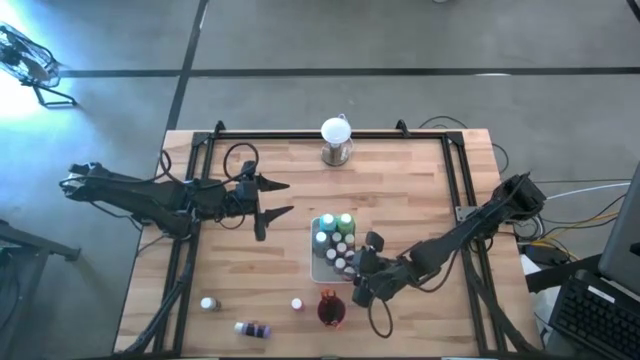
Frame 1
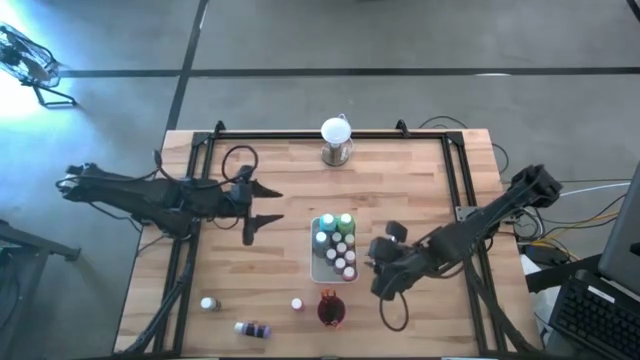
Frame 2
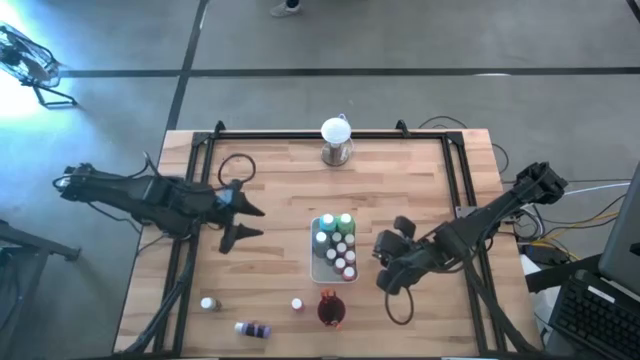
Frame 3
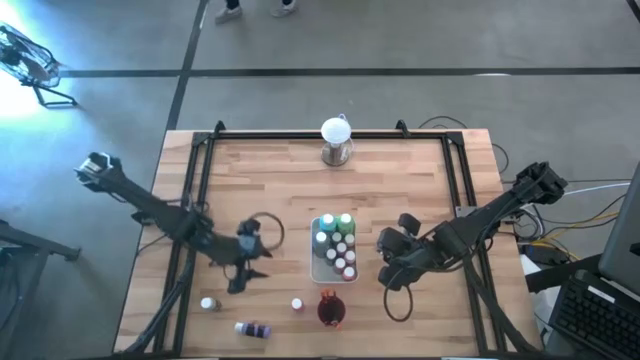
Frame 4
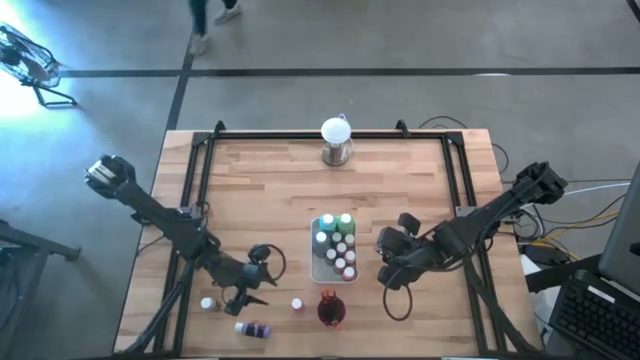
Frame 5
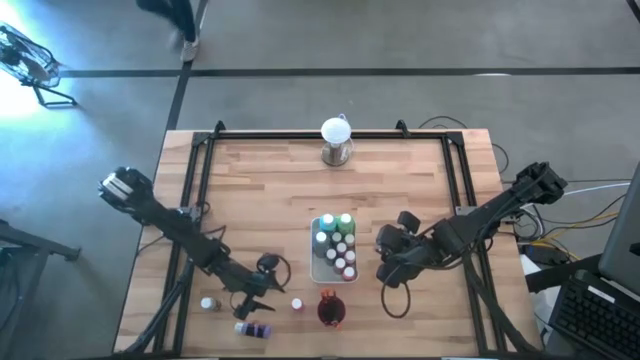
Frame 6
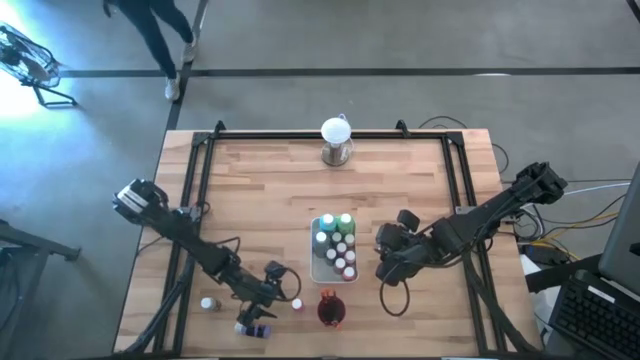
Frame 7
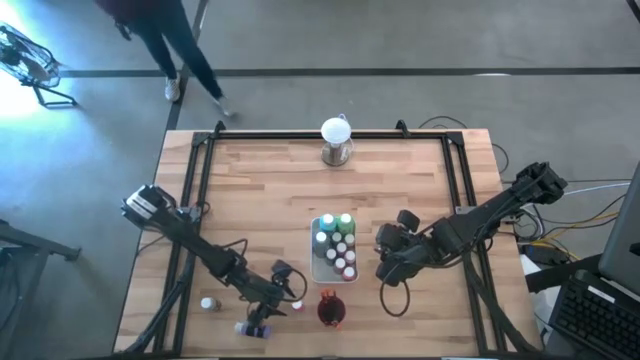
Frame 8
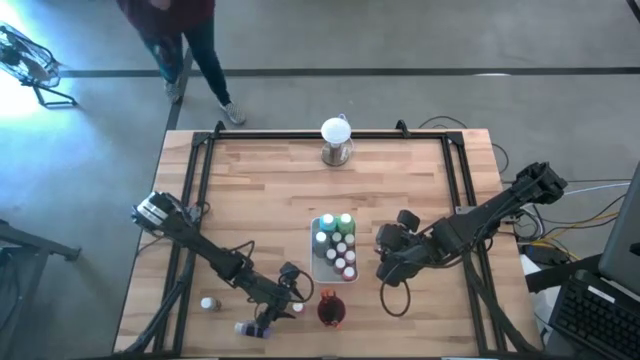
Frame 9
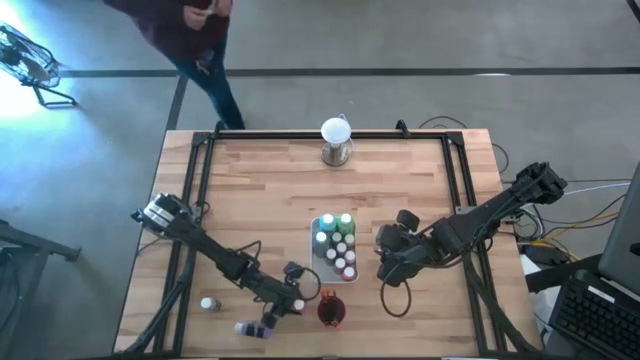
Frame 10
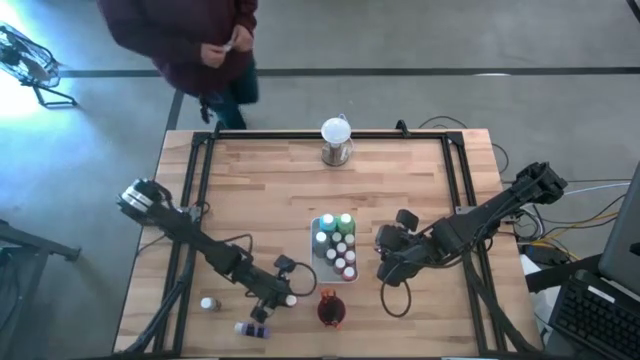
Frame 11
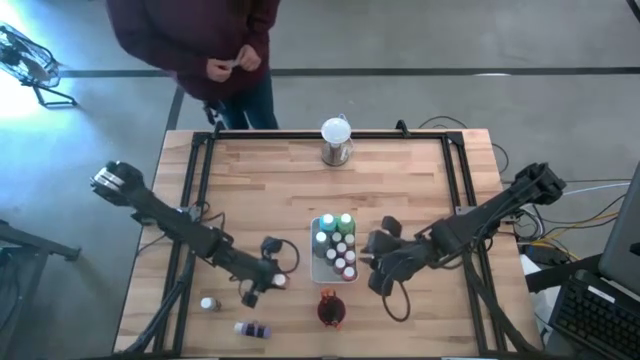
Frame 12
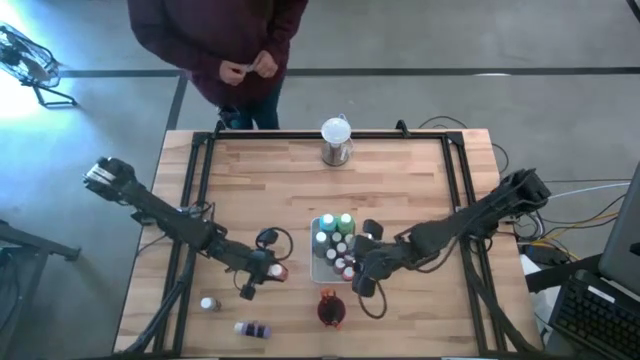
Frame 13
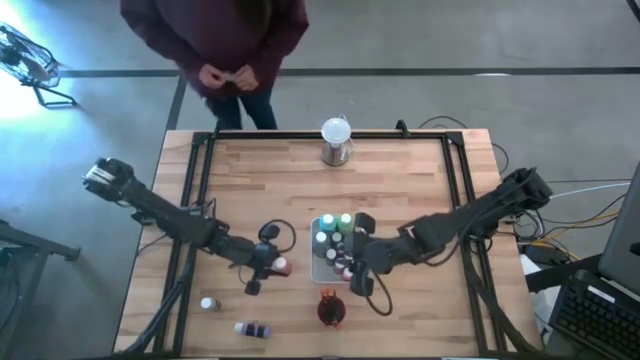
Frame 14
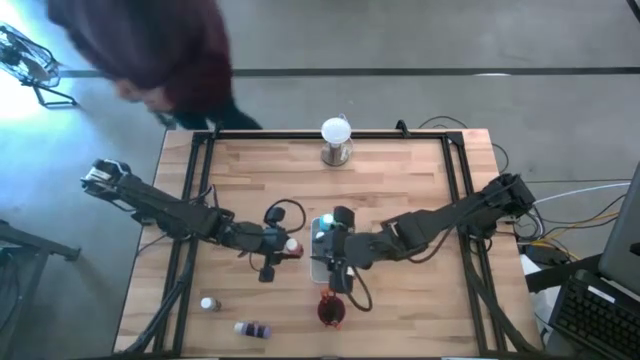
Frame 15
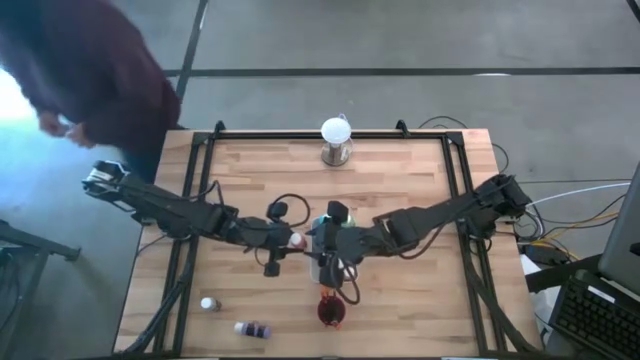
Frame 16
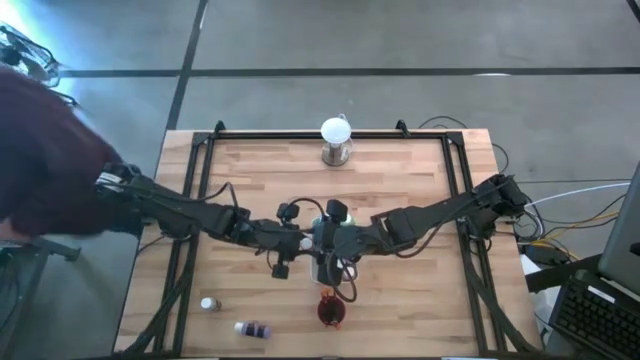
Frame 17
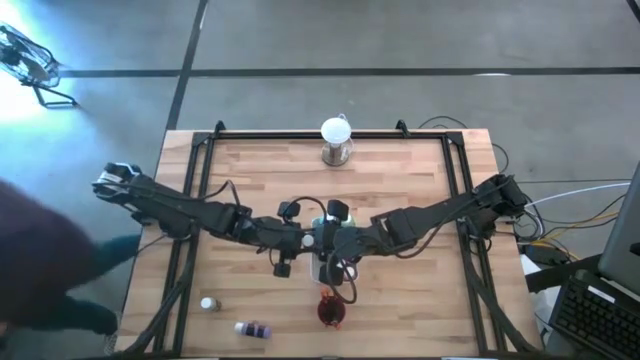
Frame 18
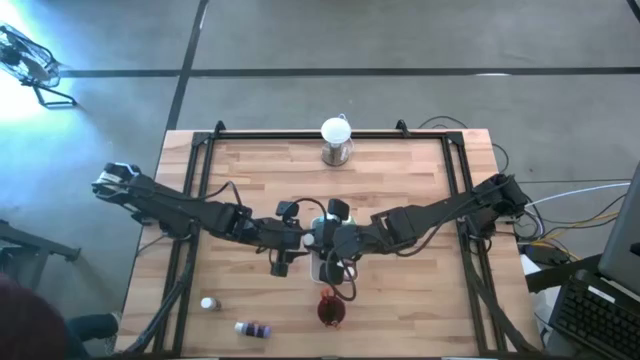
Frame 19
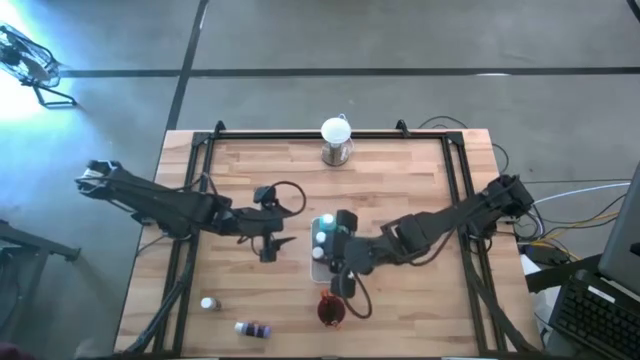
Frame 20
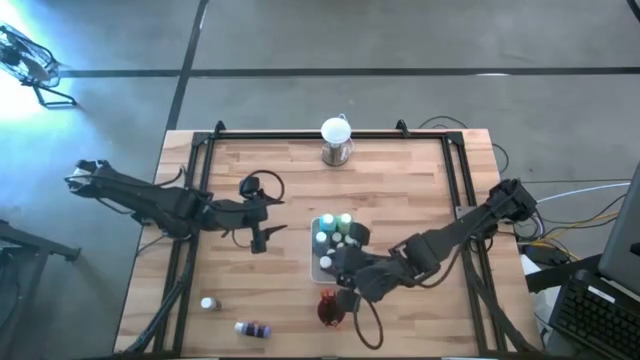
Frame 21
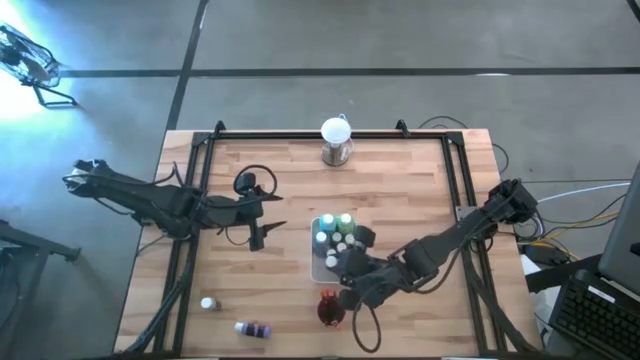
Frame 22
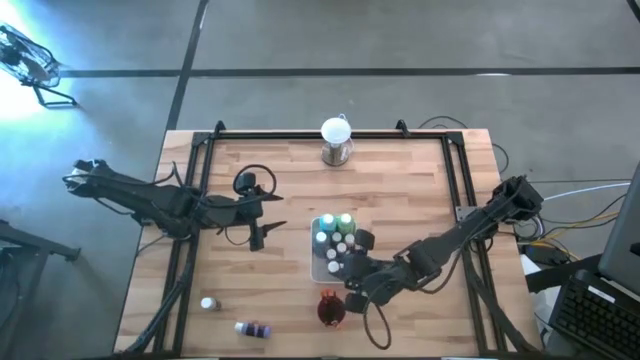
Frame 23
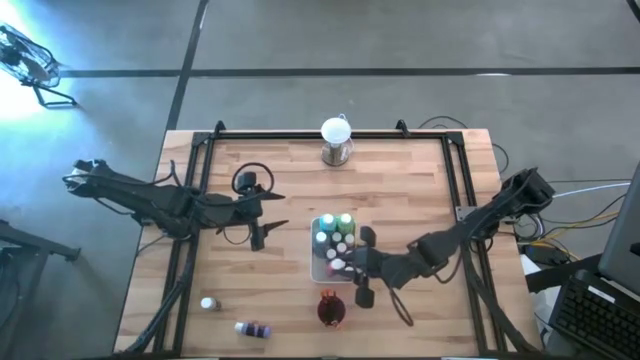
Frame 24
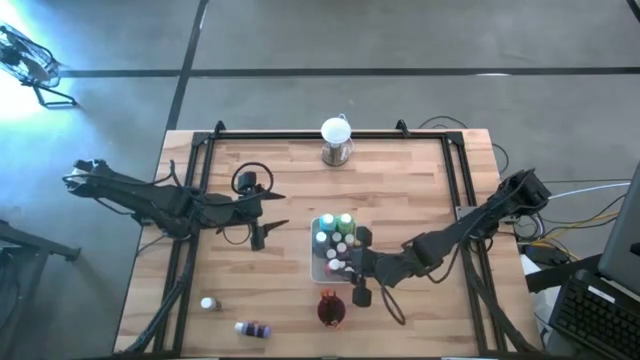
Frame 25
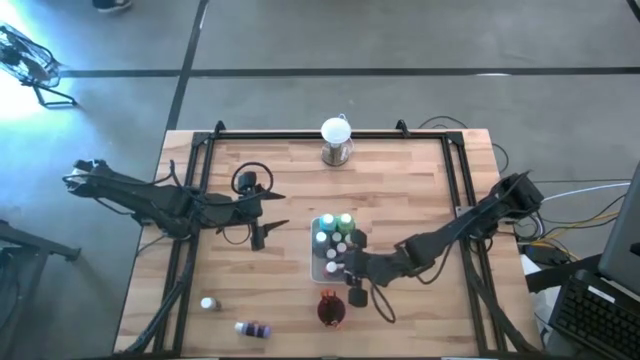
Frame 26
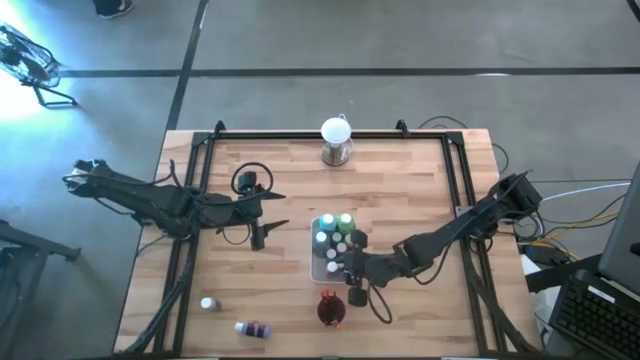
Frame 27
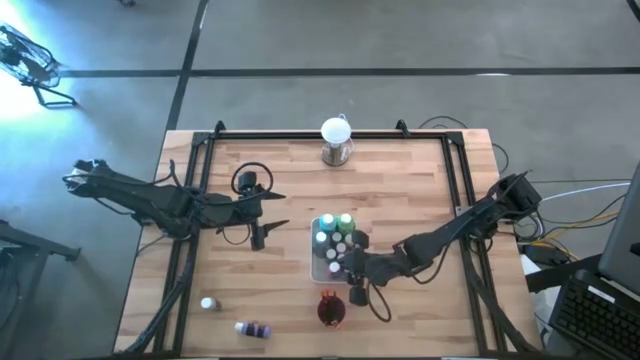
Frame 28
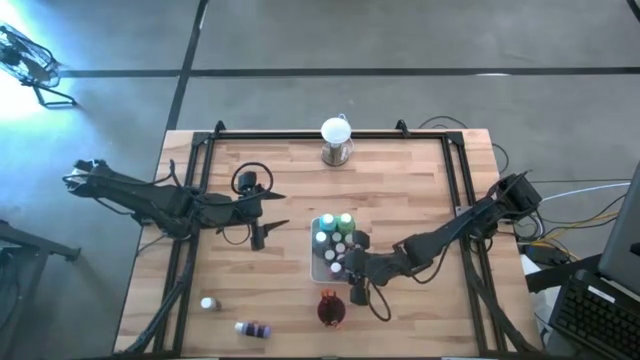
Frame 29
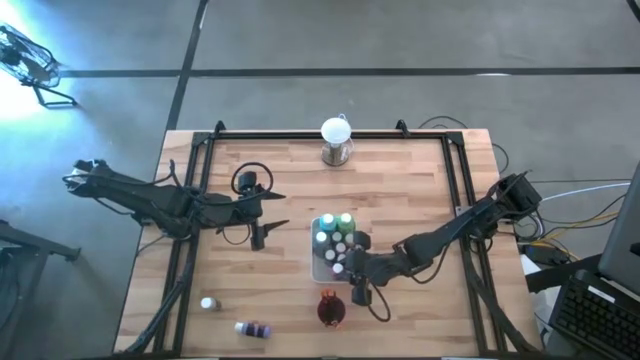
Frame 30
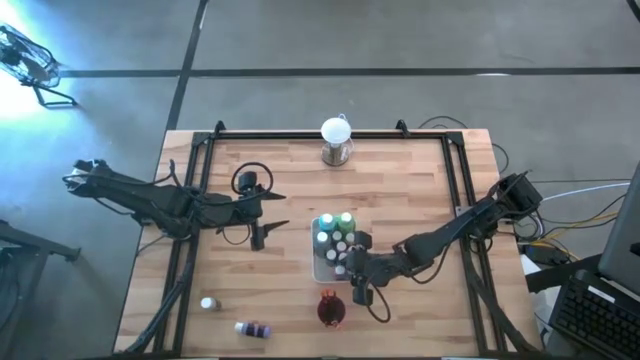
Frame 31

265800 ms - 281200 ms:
Task: Pick & Place Paint Supplies
Put the dark orange paint bottle into the white bin
